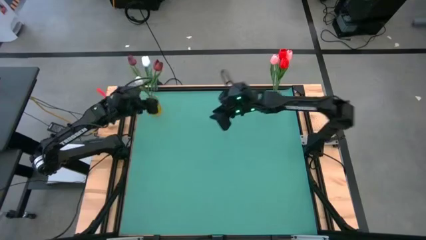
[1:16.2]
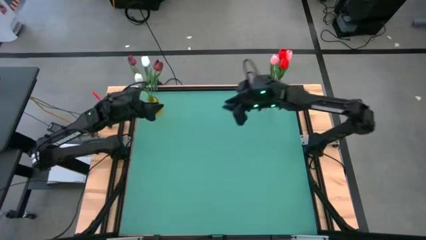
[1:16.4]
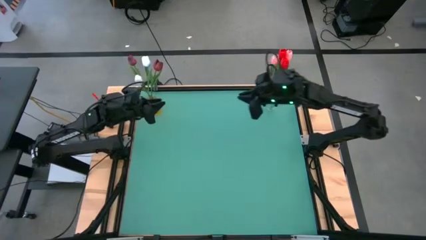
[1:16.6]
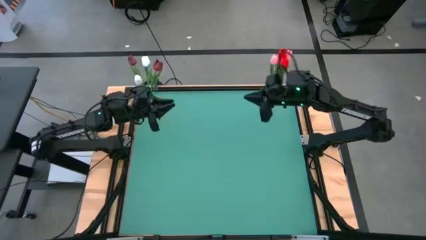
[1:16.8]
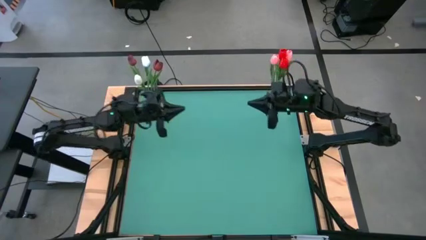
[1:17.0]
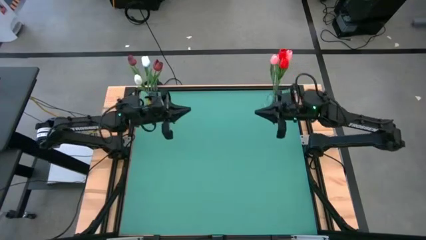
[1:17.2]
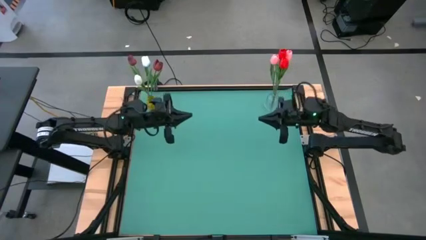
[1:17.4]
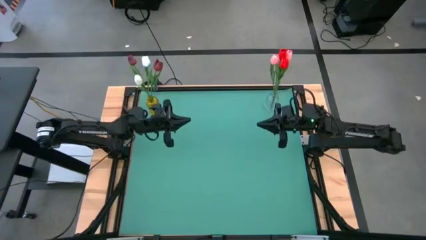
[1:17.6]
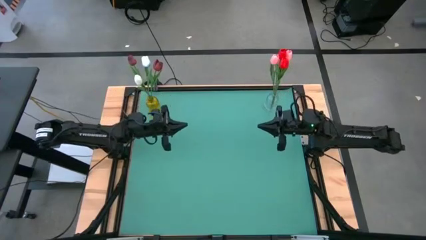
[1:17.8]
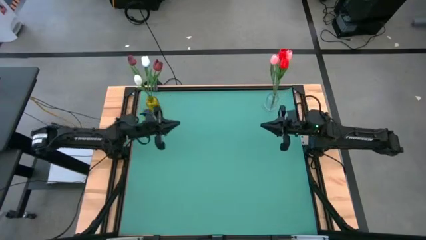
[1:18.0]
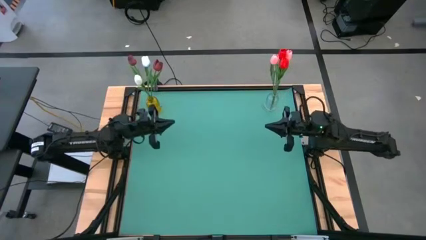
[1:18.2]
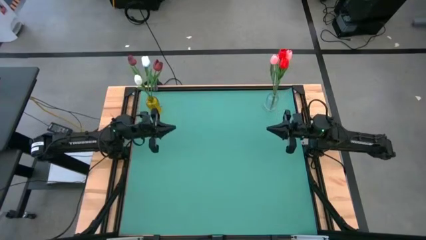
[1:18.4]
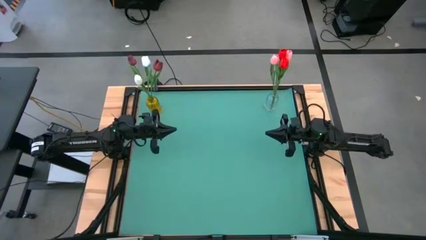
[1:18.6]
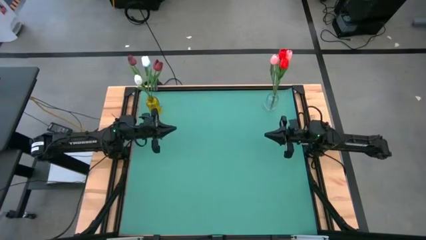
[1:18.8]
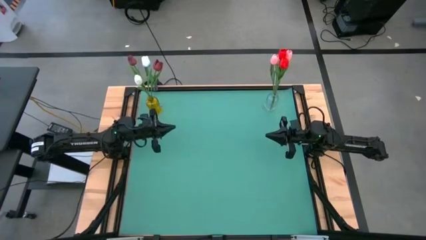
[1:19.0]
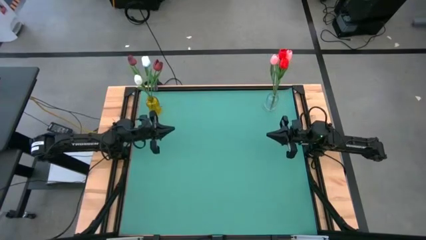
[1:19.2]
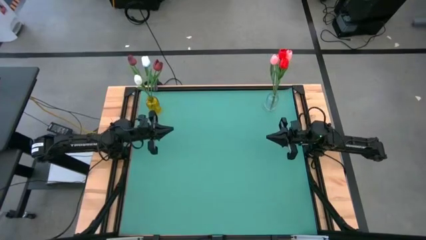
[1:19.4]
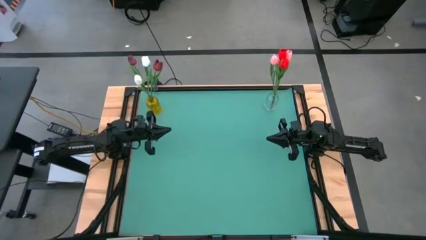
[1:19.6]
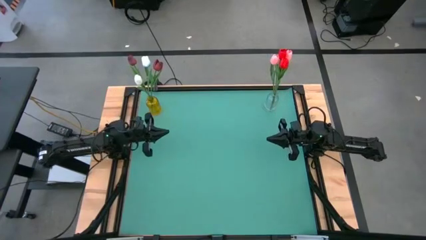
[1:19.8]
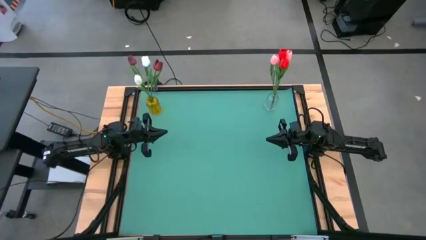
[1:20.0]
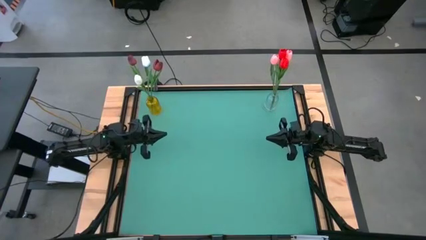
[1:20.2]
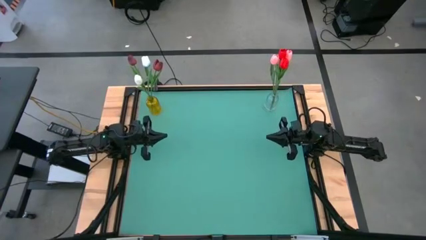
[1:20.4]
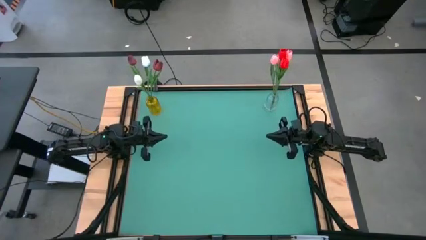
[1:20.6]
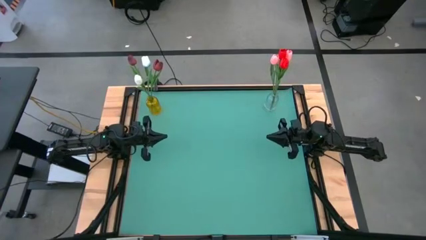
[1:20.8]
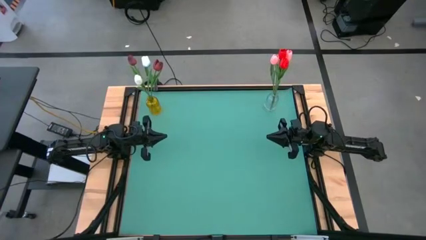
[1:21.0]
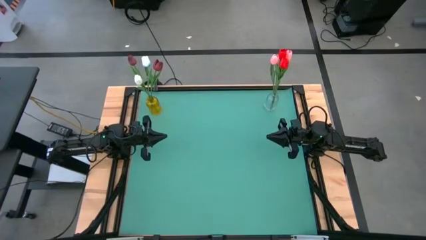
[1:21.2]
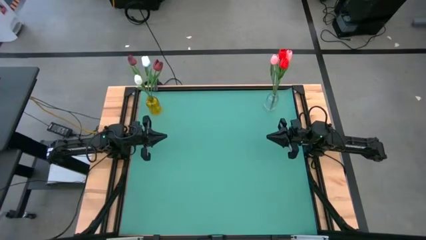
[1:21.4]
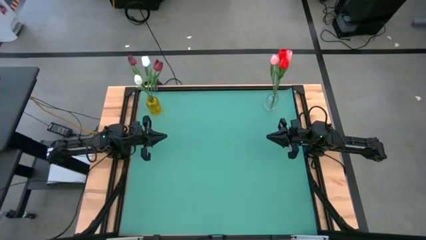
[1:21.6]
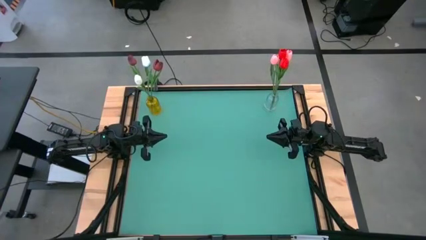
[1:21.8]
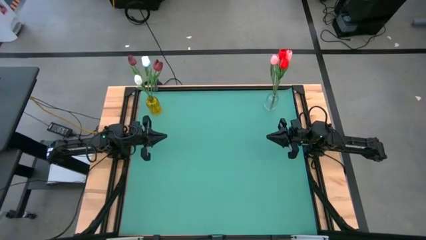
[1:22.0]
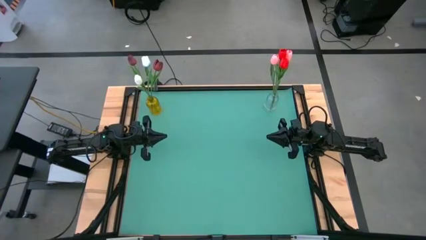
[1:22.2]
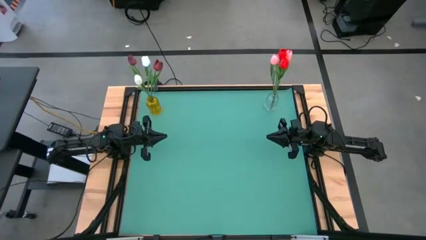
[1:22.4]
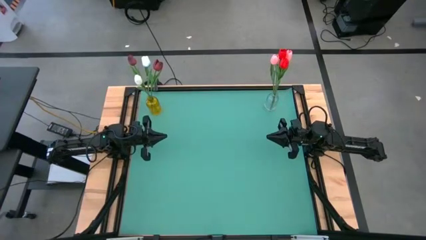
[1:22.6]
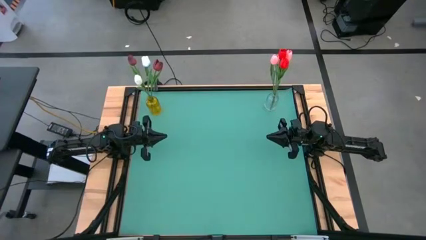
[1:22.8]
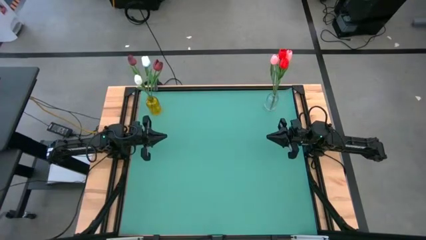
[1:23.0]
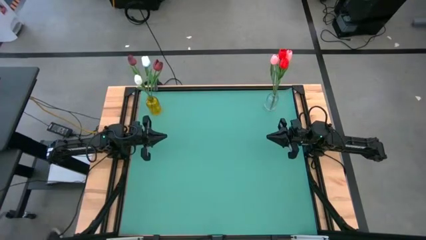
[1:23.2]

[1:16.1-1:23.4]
Task: Sort flowers into vase by color
Return to Home Position

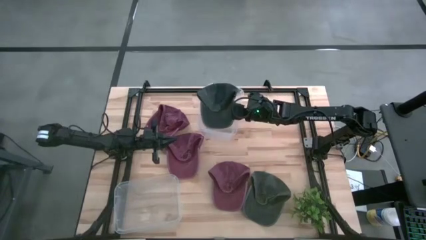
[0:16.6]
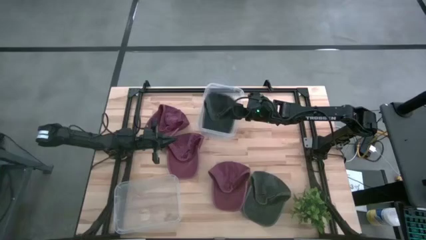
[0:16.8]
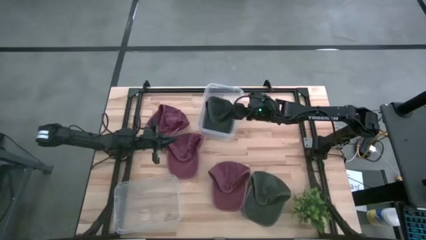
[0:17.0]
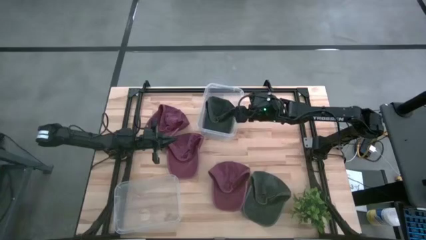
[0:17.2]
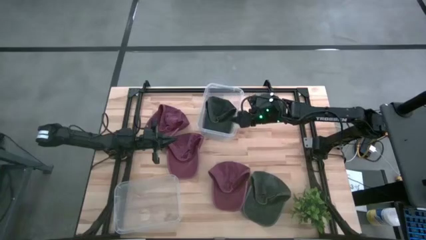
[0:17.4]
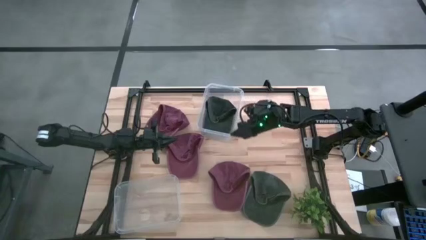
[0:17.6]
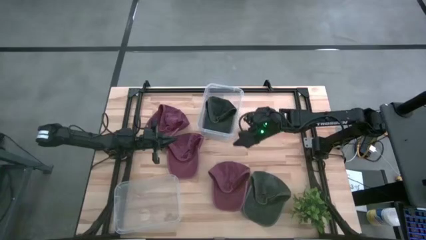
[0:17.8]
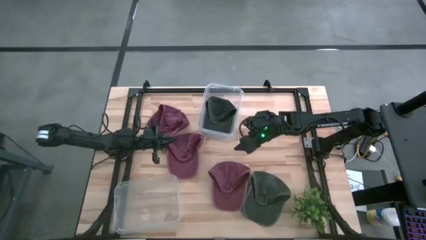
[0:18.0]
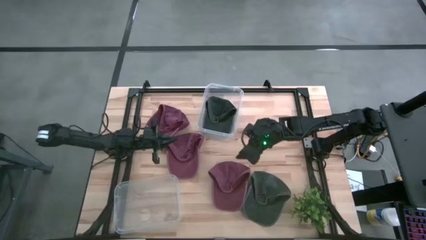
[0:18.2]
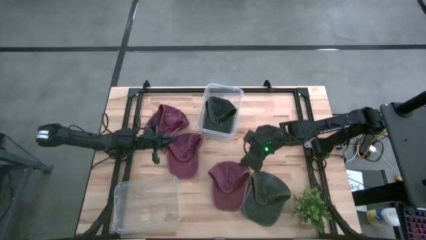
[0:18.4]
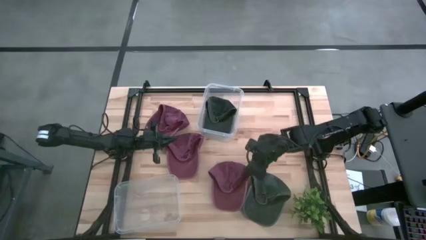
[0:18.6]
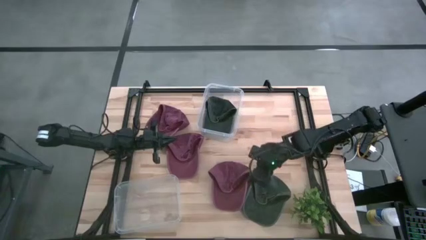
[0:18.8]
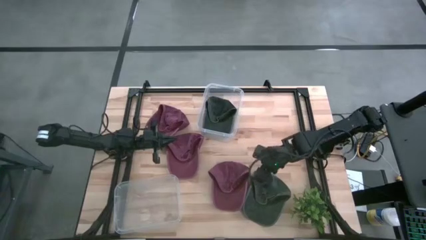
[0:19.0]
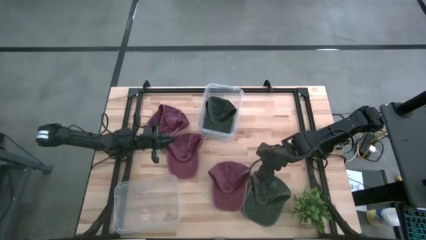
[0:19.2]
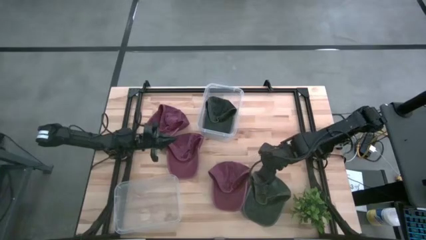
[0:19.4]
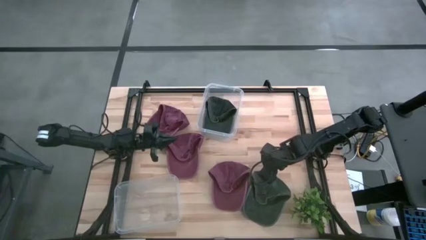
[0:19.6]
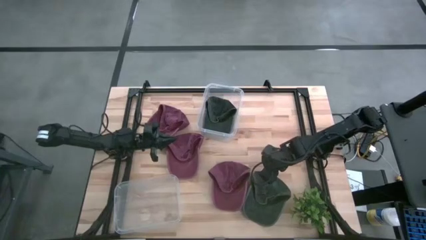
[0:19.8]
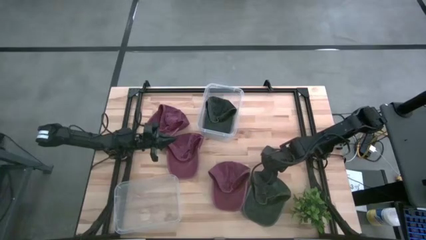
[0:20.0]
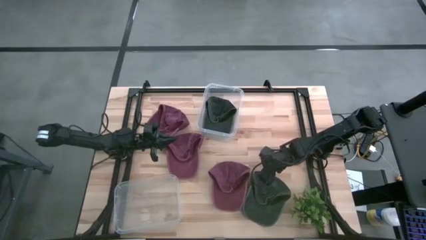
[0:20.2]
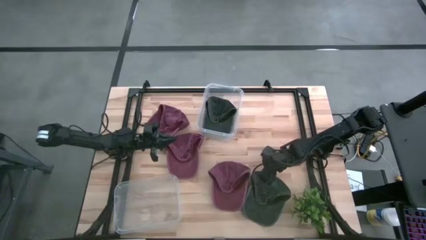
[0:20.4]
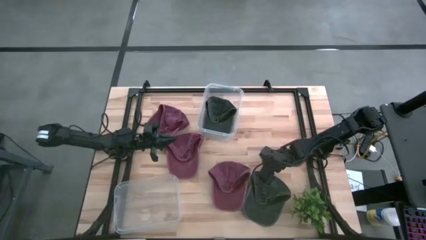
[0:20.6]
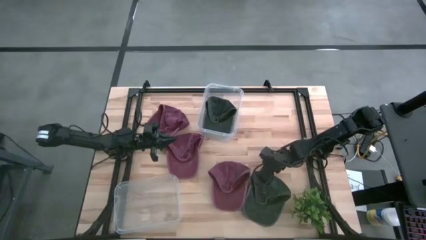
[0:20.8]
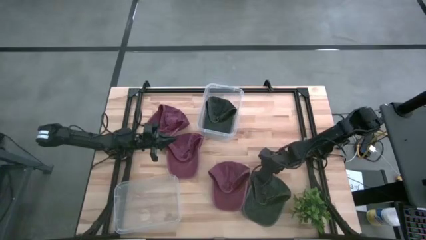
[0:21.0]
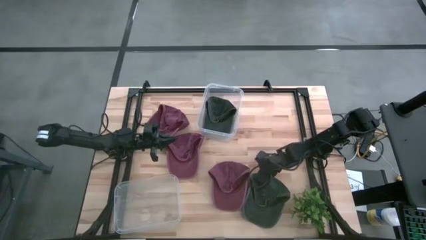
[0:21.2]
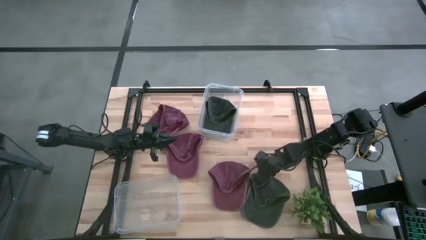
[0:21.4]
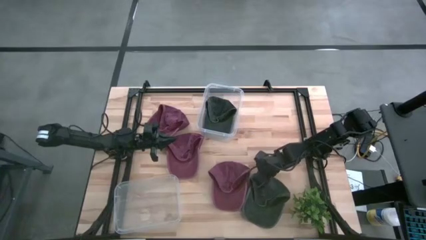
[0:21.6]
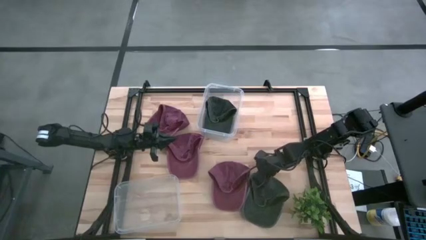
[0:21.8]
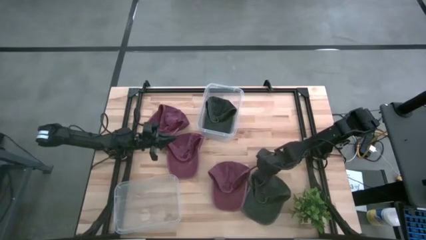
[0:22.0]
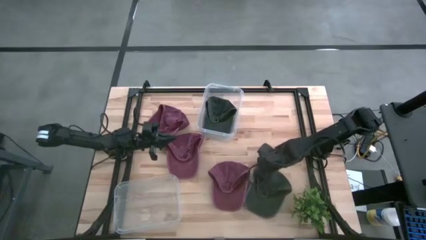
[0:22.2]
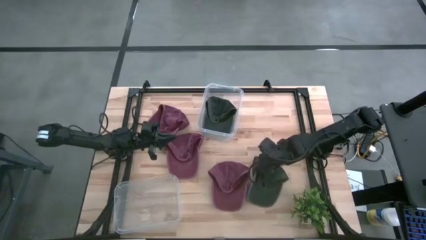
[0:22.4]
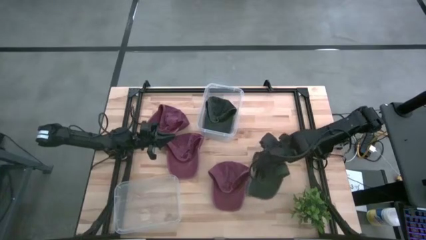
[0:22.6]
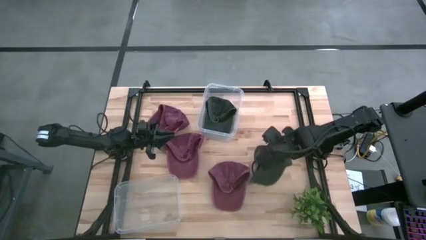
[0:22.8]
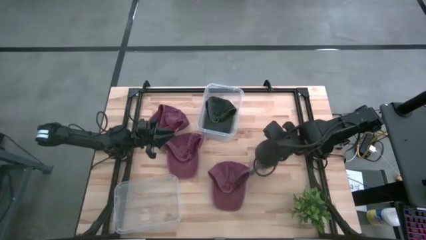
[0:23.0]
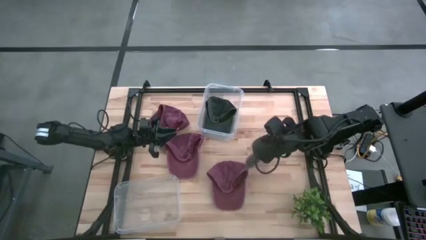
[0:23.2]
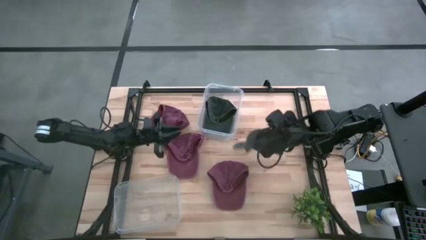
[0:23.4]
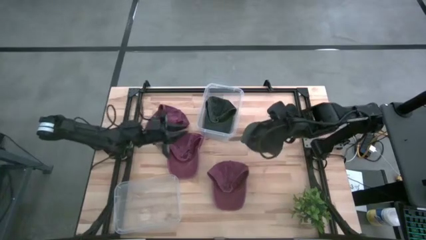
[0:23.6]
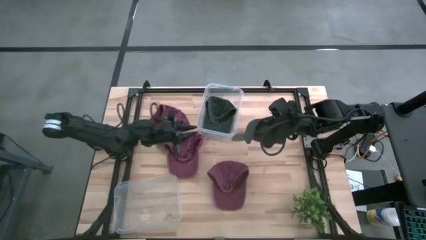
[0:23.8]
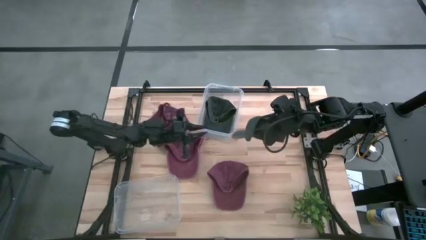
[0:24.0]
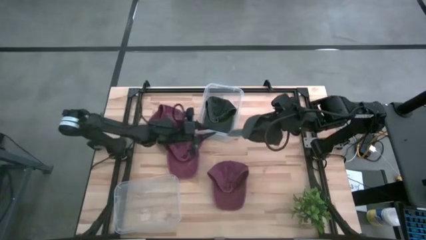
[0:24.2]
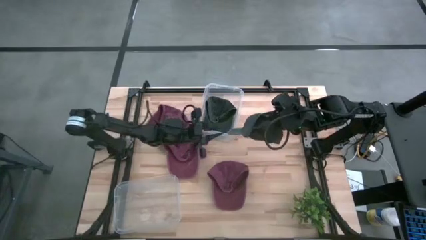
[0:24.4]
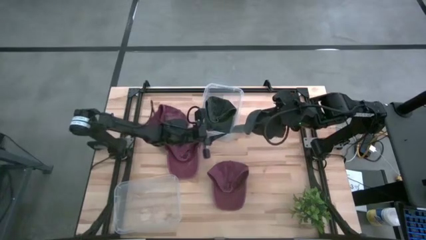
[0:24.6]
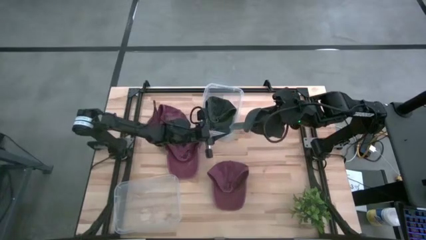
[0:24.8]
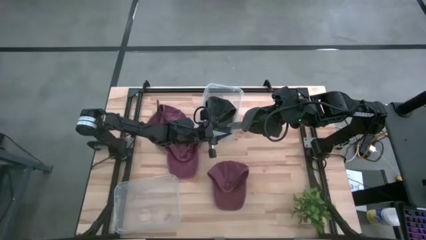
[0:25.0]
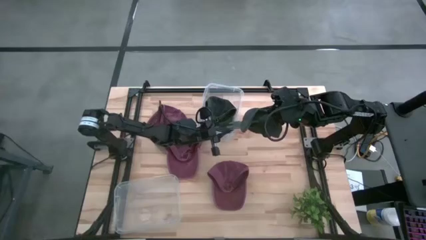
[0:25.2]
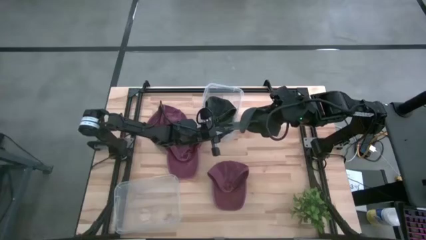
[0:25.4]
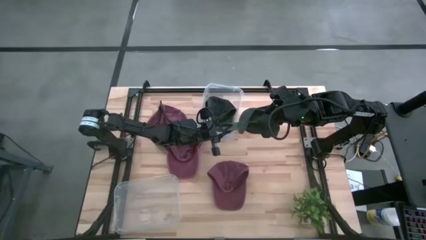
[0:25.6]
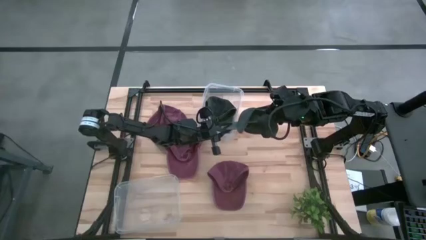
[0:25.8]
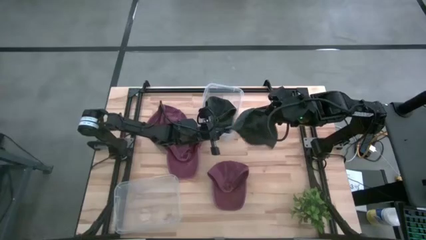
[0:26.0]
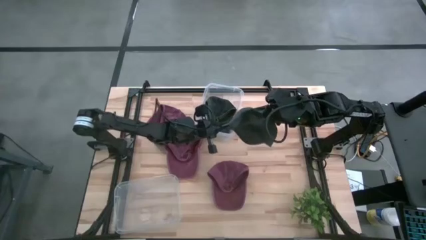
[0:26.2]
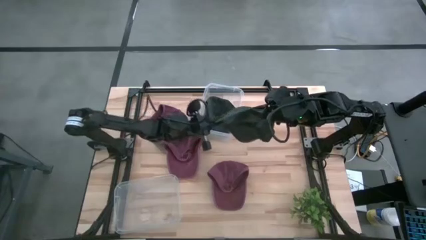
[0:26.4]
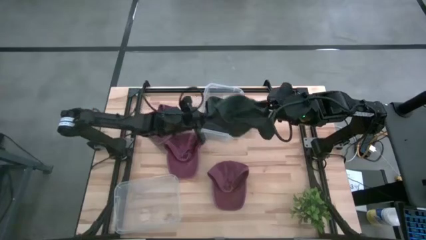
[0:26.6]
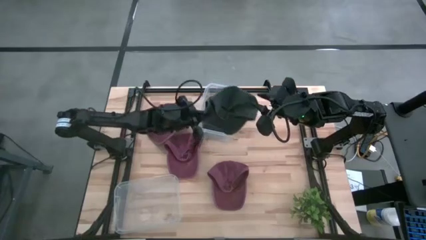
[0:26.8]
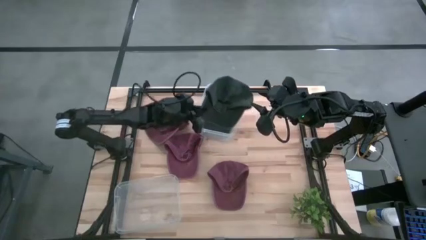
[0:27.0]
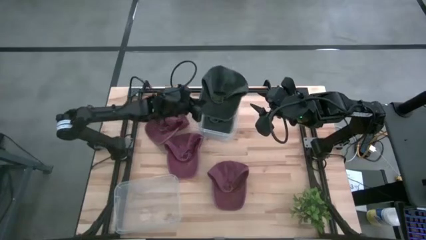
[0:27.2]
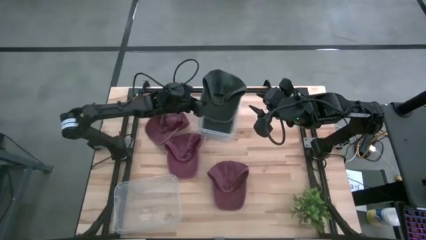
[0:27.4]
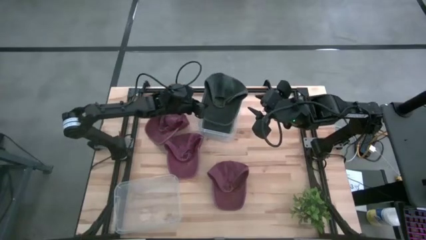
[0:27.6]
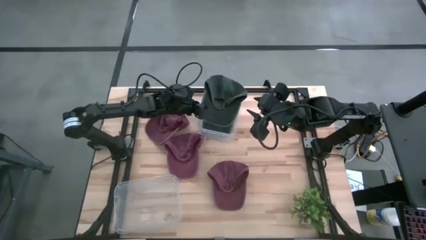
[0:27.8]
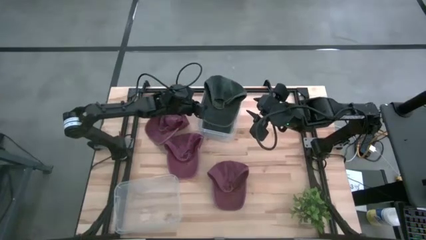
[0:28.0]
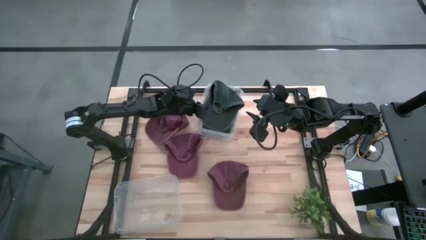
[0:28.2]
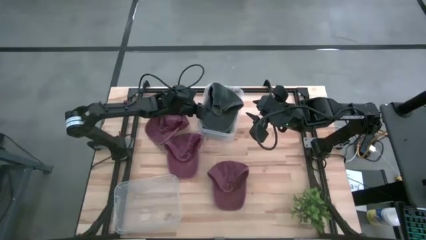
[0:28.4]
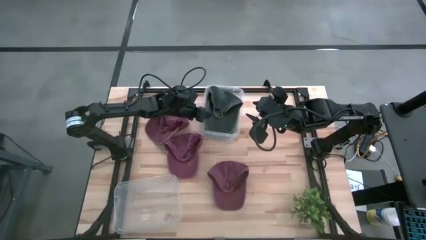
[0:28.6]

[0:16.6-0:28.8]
Task: Pick and place caps into container
Put the green cap into the top transparent container
